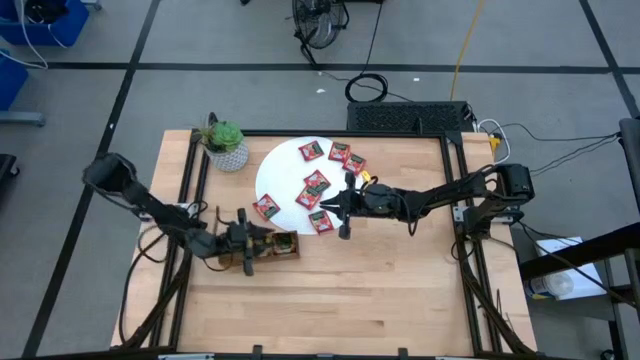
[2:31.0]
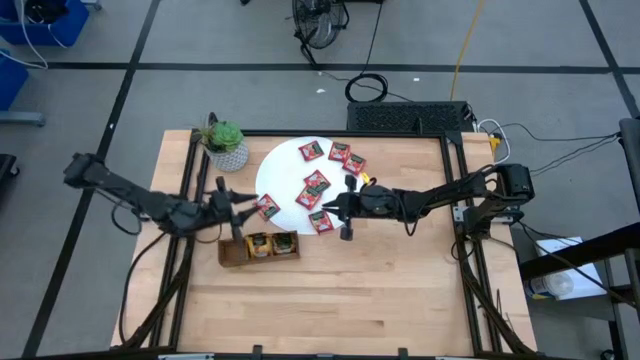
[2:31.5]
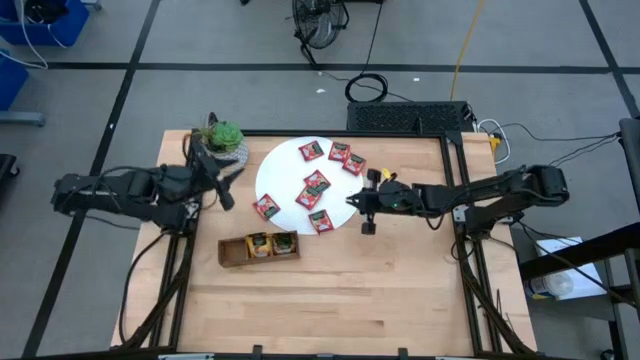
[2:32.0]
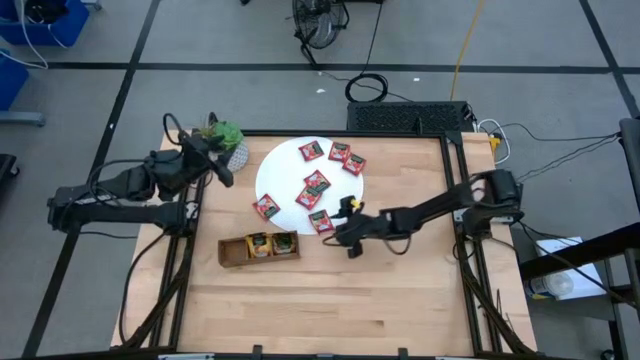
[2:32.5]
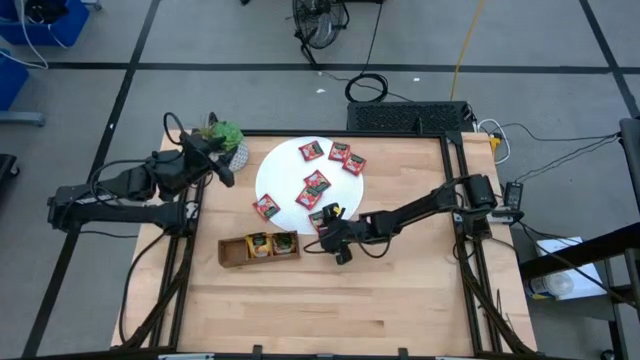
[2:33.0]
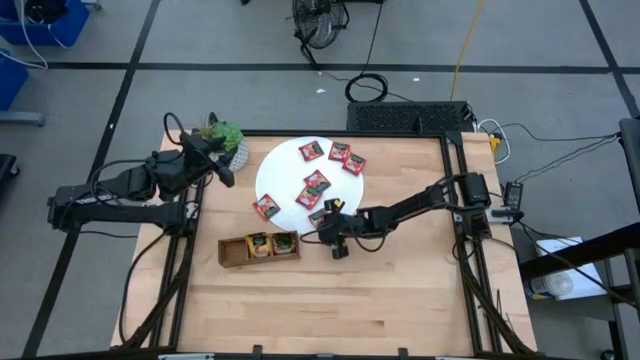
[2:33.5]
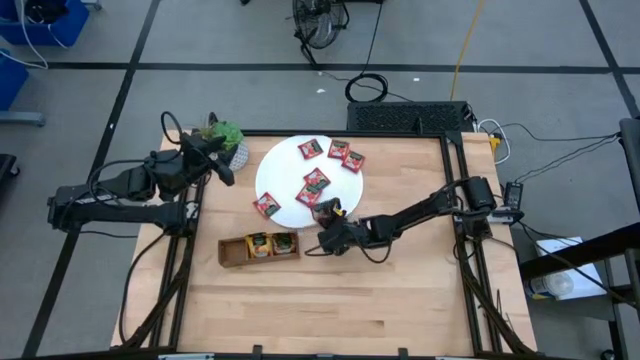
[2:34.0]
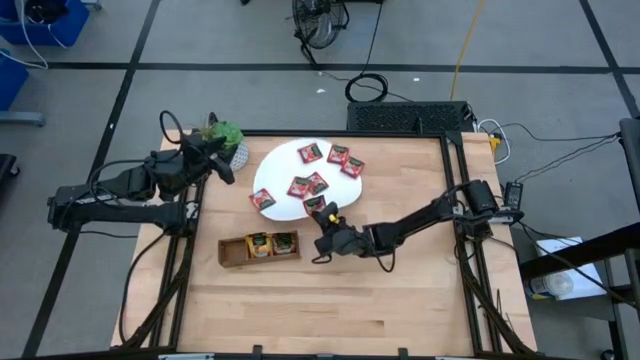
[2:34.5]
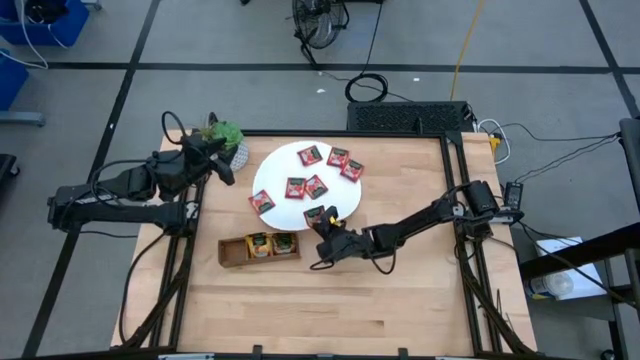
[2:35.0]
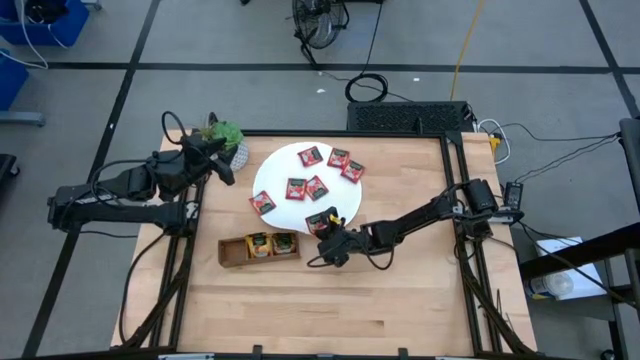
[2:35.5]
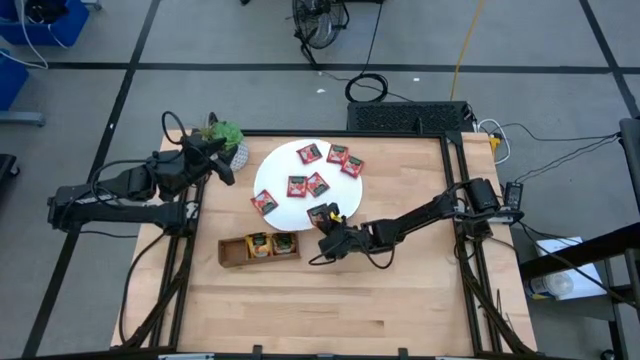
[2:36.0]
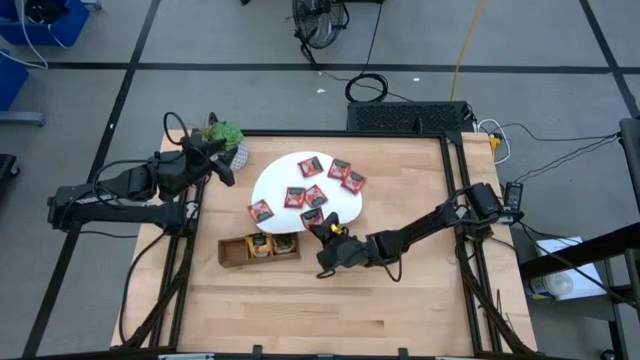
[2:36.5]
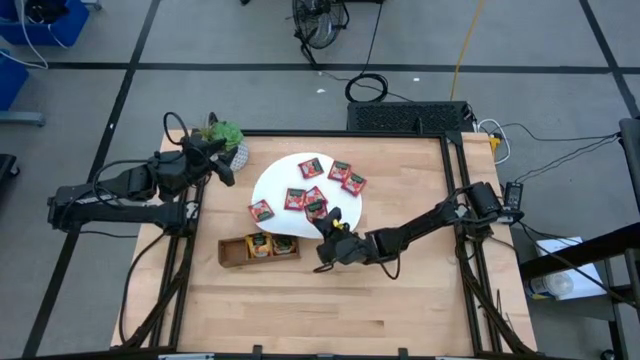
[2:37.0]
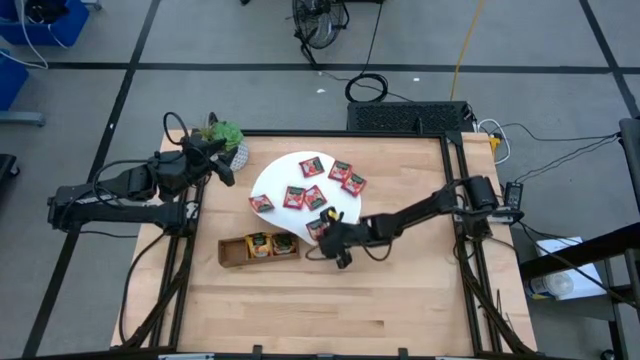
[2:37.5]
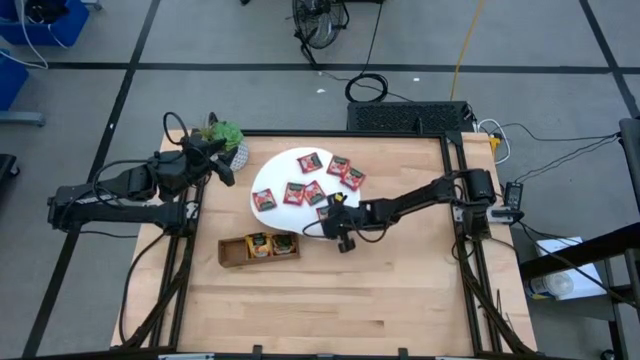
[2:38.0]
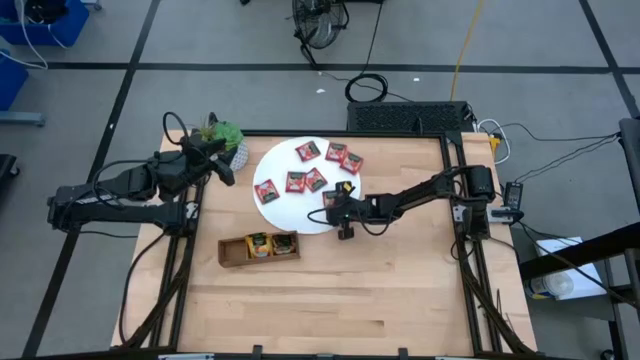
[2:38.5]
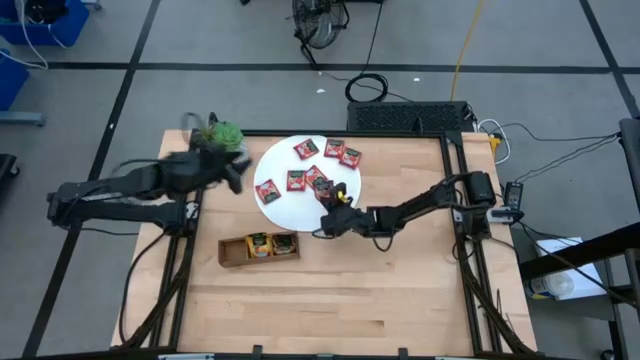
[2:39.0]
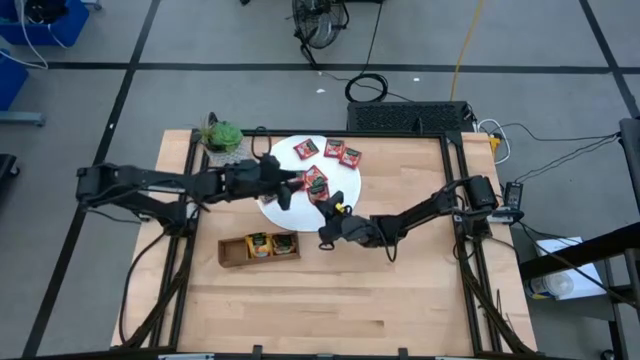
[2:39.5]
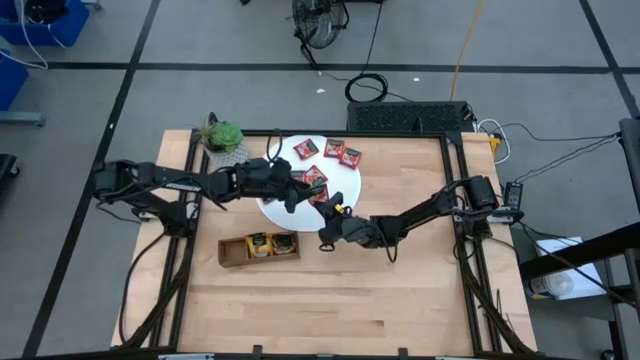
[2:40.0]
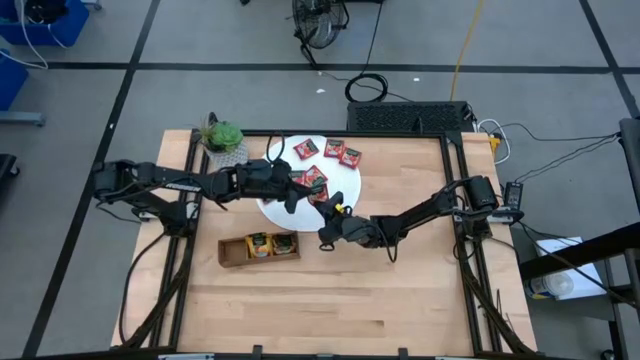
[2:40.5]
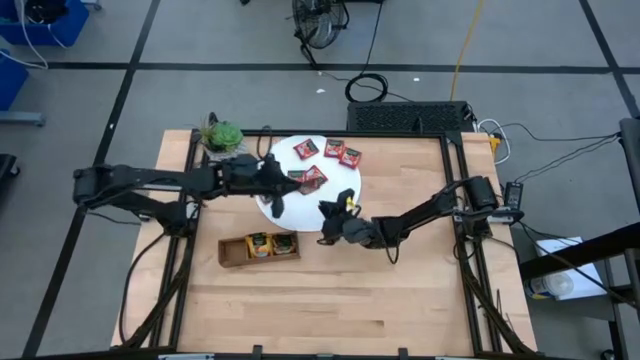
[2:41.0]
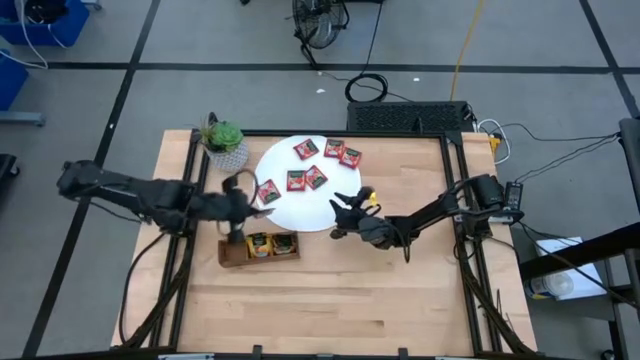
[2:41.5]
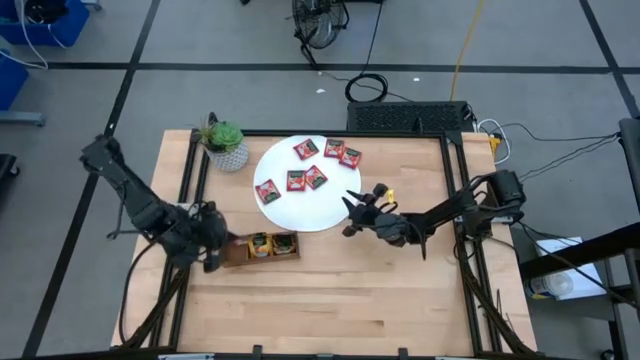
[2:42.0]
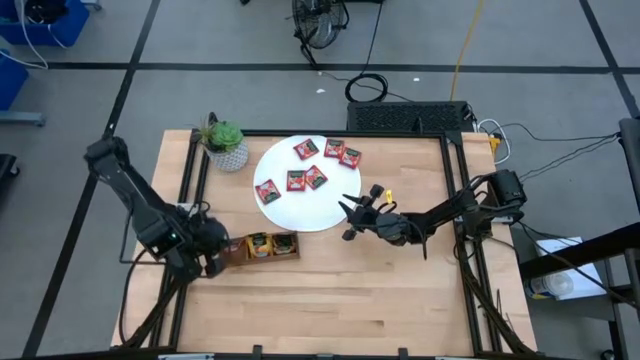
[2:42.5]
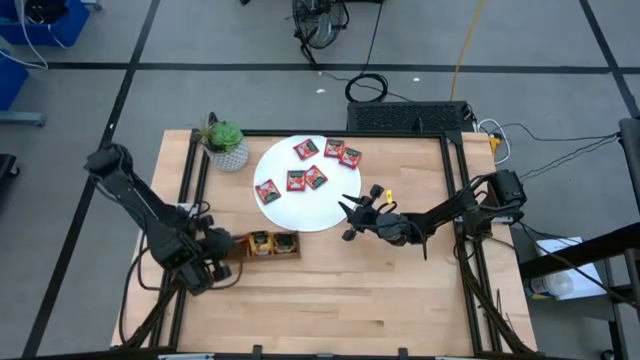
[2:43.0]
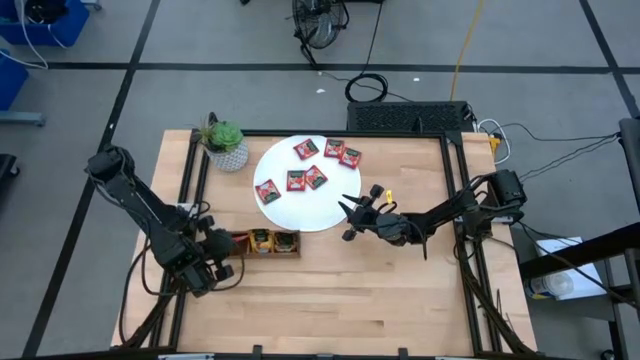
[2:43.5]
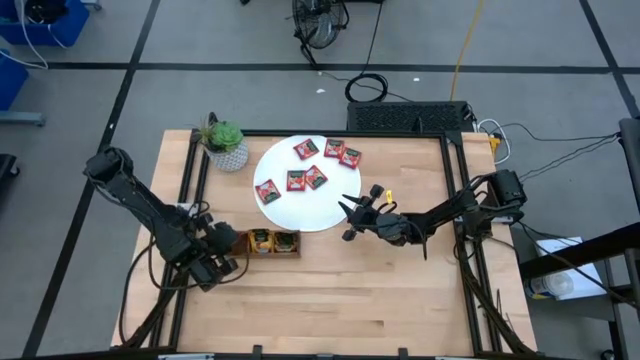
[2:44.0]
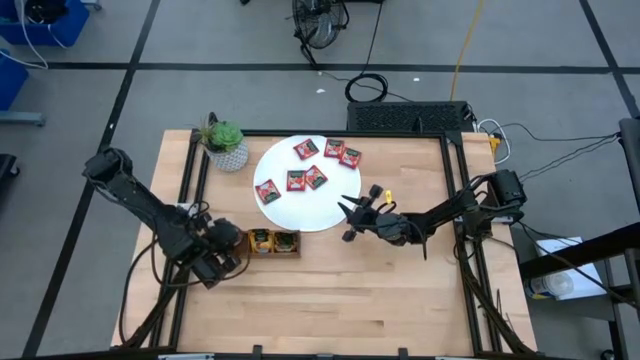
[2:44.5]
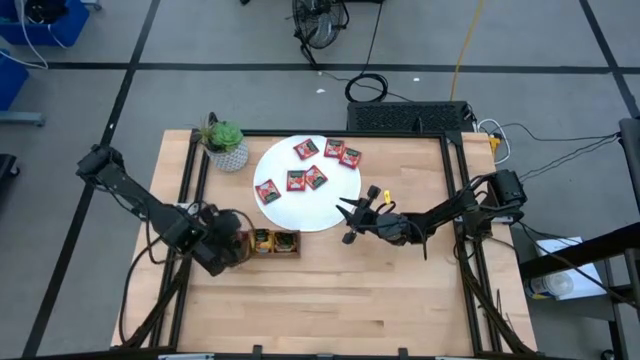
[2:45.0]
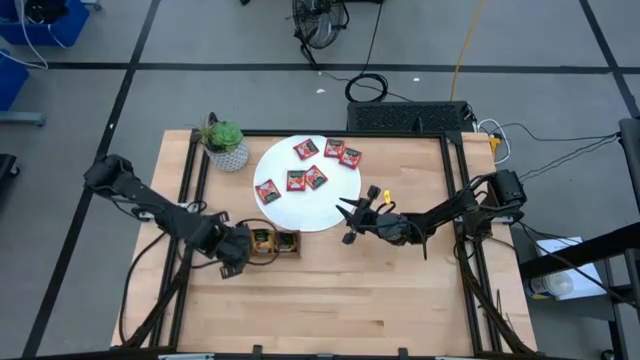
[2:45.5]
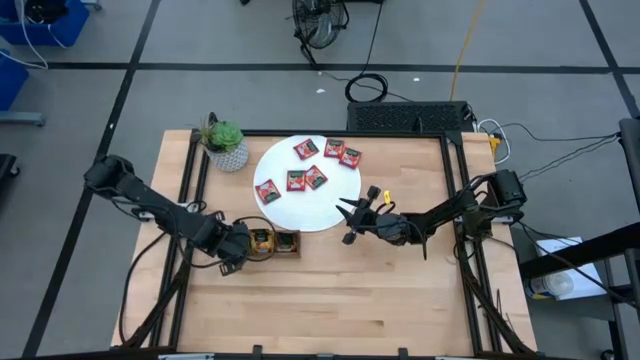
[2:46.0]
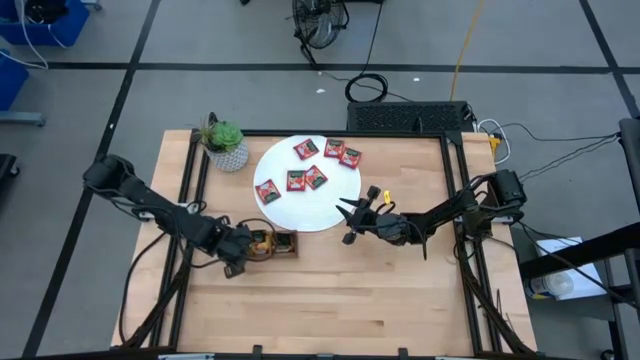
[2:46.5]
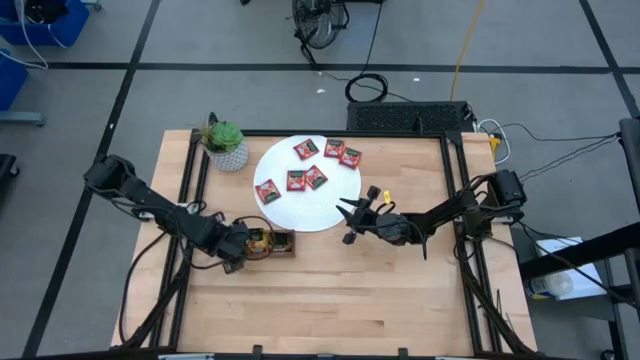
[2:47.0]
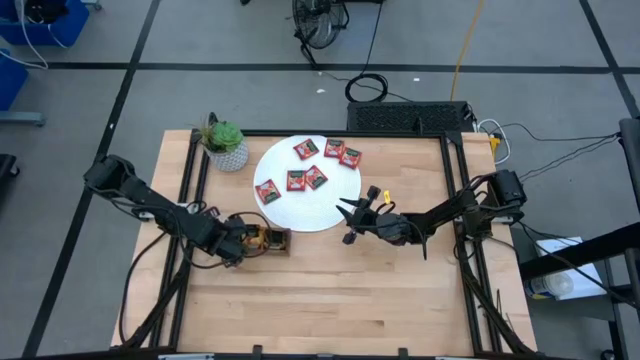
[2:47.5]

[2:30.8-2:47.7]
Task: Pick & Place Tea
Put the red tea bag into the left section of the wooden organizer

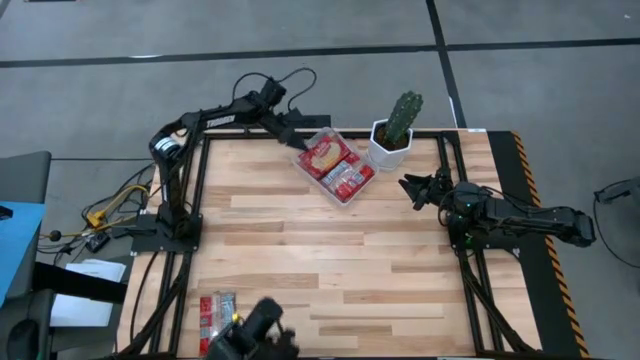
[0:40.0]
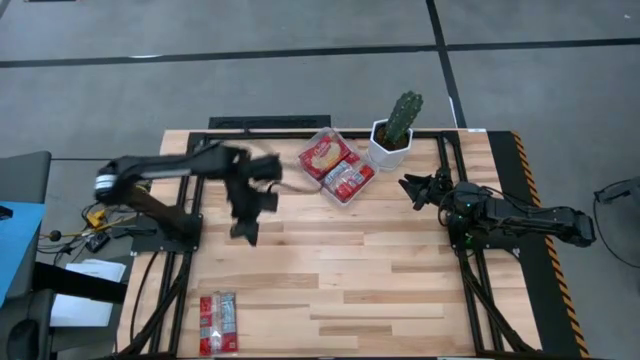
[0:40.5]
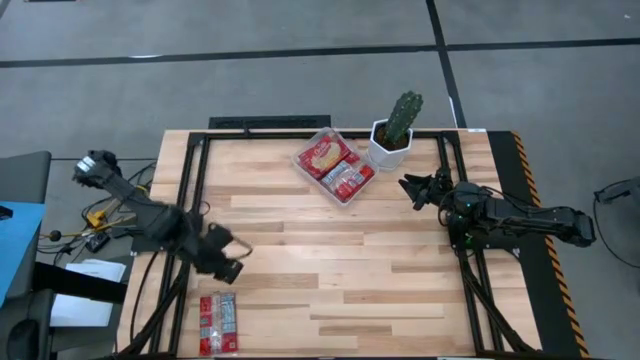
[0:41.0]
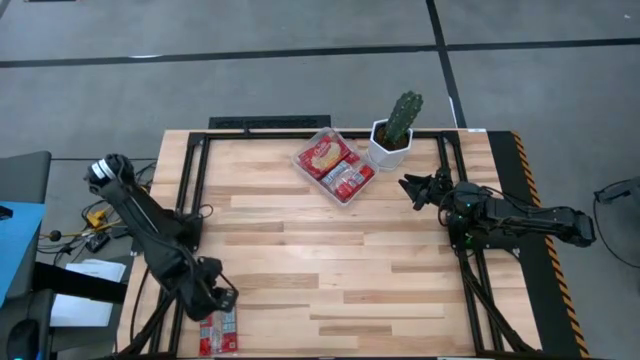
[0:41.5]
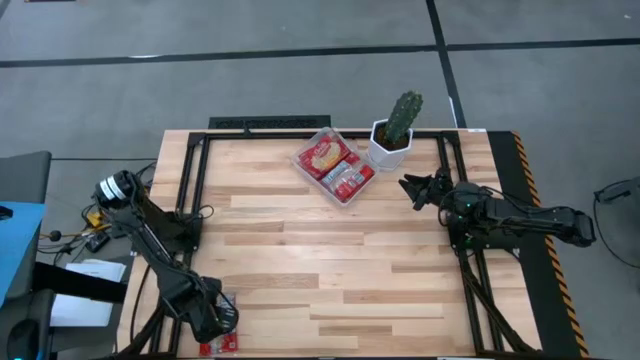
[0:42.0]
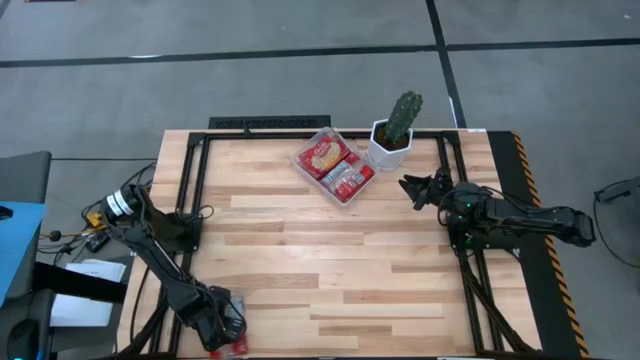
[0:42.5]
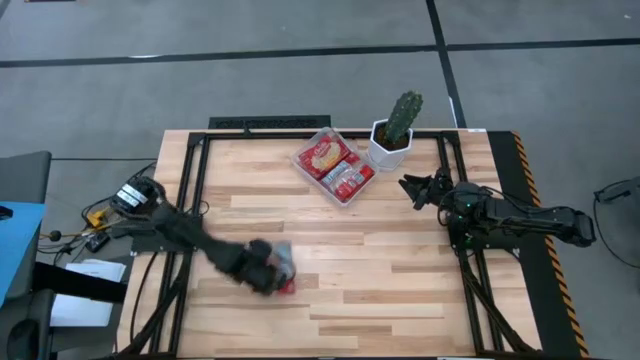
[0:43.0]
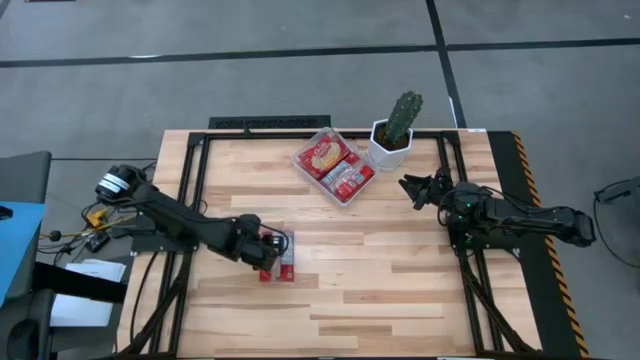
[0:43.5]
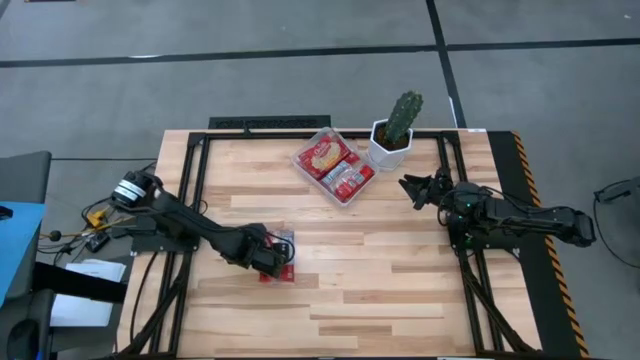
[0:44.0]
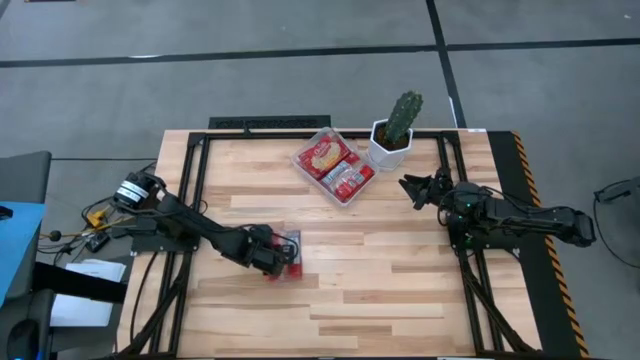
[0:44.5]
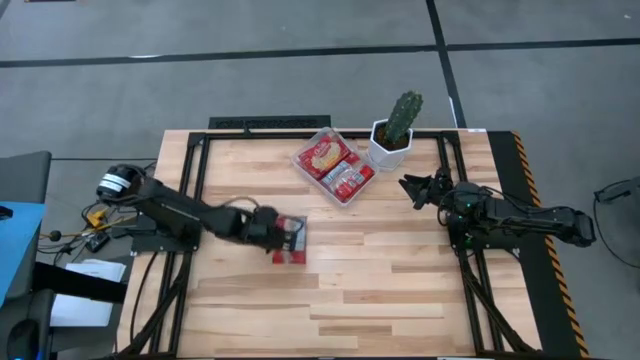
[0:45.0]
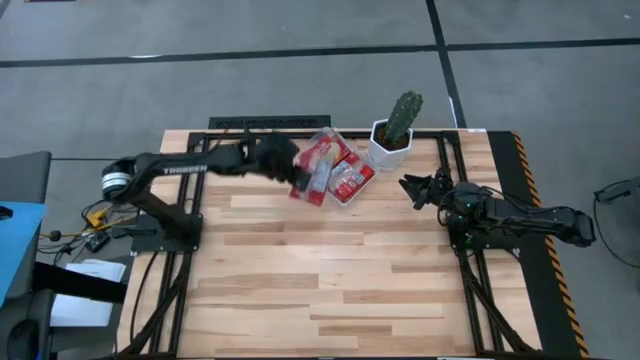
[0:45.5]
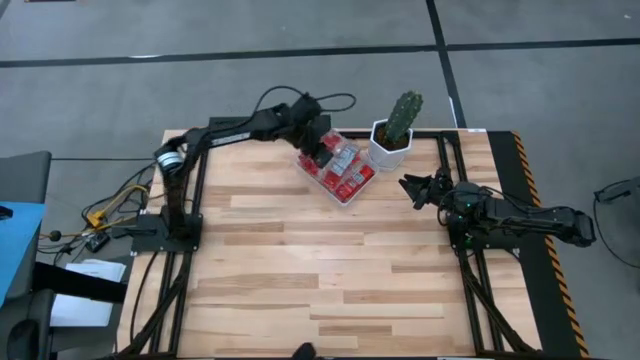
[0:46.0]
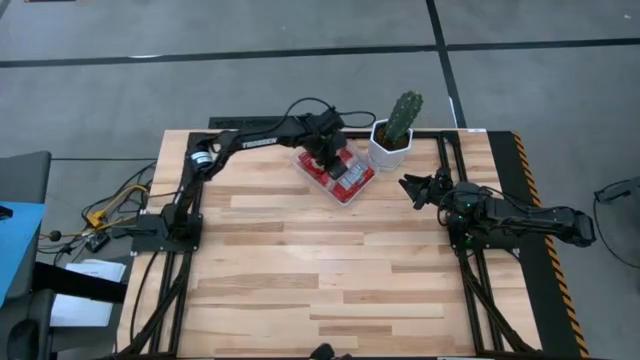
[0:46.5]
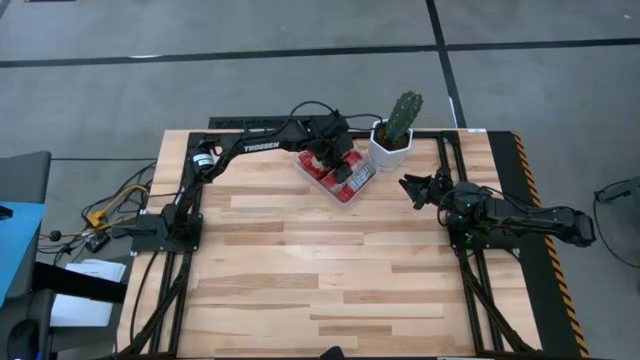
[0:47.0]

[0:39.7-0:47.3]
Task: Sort popcorn bags into baskets
Put the red popcorn bag into the transparent bin
